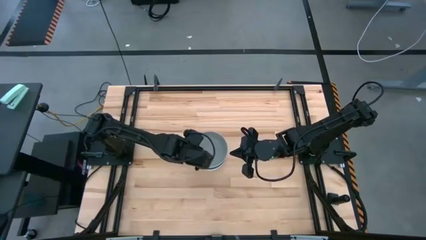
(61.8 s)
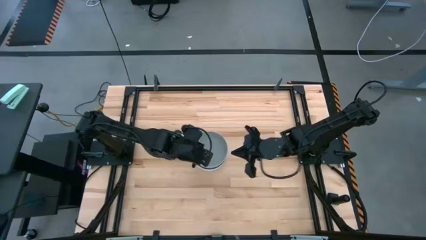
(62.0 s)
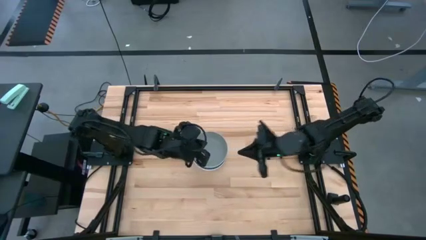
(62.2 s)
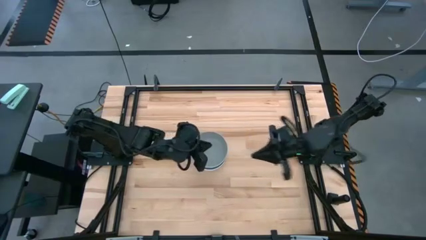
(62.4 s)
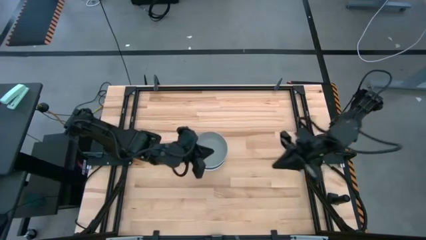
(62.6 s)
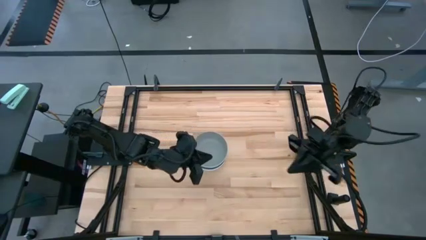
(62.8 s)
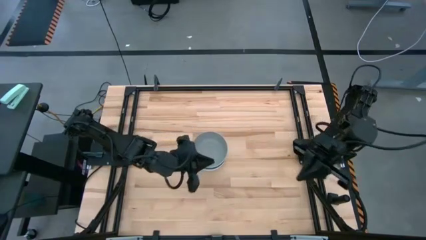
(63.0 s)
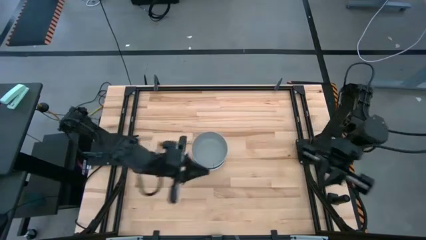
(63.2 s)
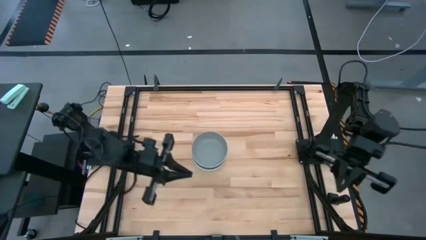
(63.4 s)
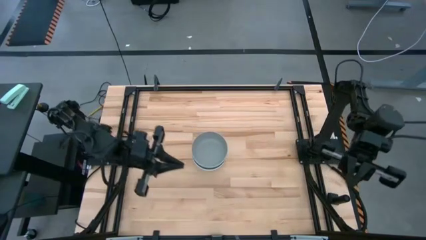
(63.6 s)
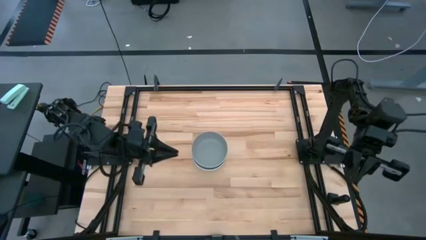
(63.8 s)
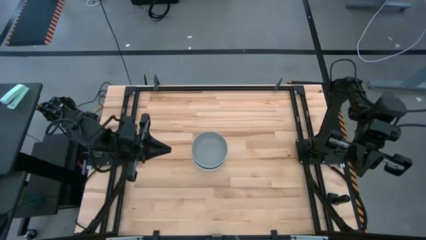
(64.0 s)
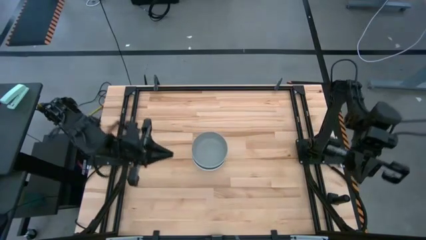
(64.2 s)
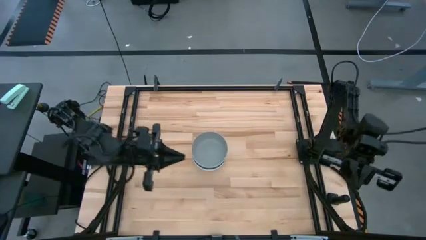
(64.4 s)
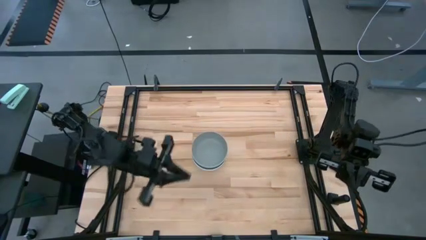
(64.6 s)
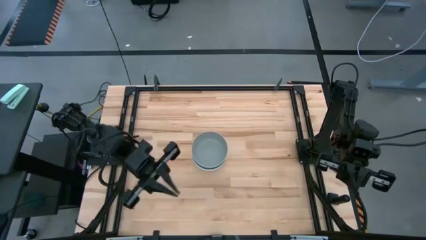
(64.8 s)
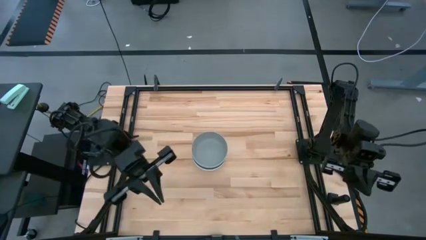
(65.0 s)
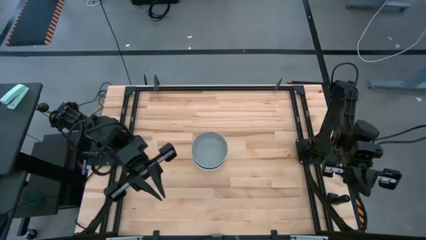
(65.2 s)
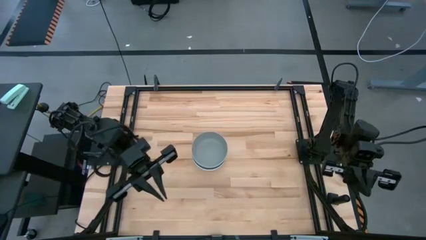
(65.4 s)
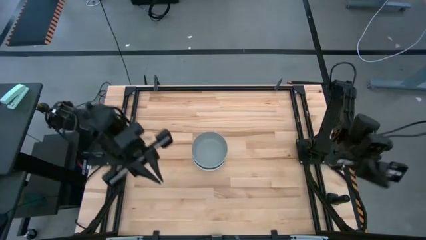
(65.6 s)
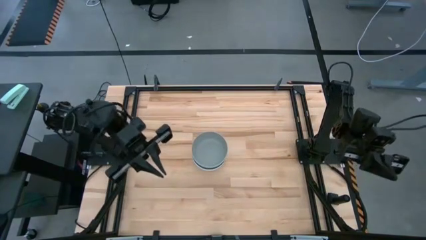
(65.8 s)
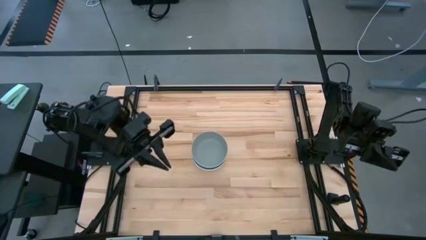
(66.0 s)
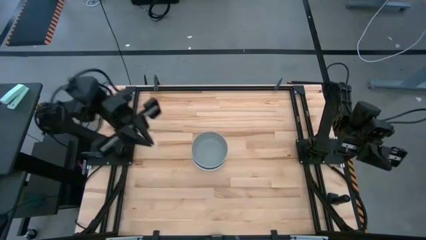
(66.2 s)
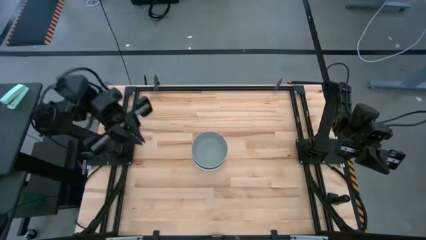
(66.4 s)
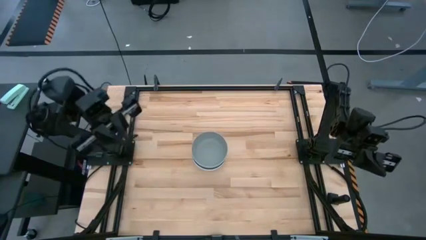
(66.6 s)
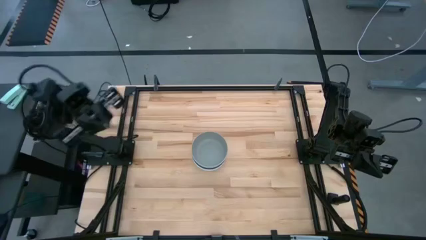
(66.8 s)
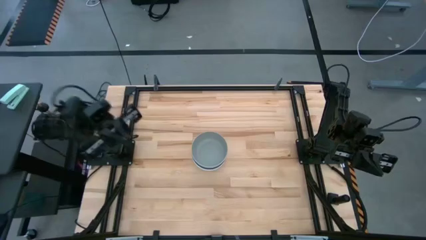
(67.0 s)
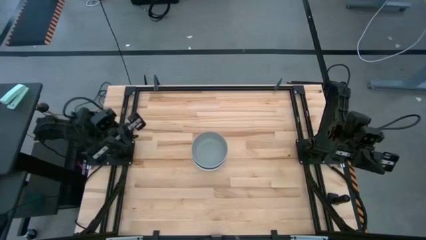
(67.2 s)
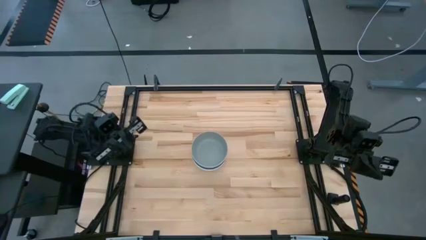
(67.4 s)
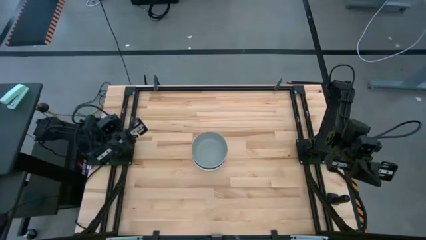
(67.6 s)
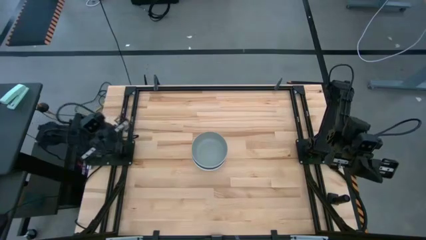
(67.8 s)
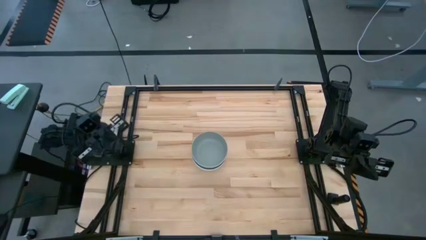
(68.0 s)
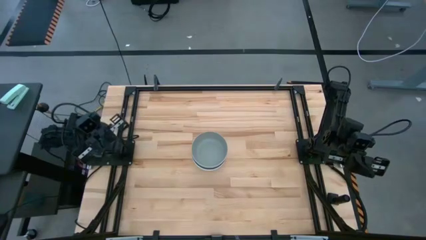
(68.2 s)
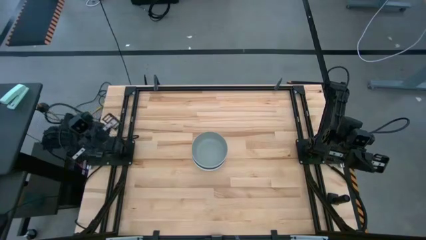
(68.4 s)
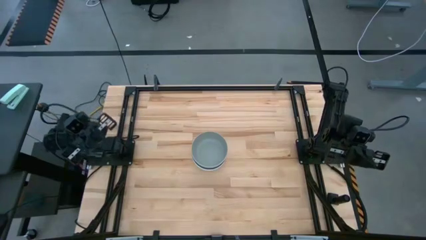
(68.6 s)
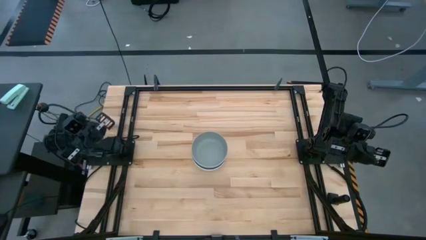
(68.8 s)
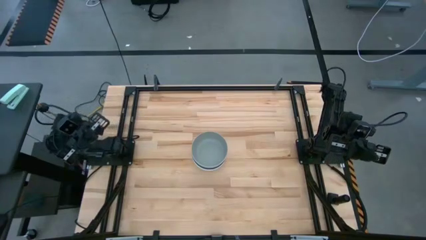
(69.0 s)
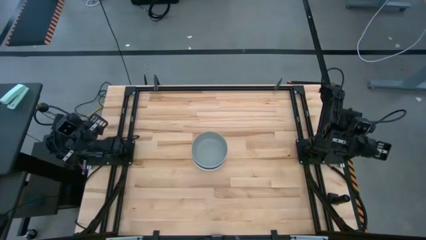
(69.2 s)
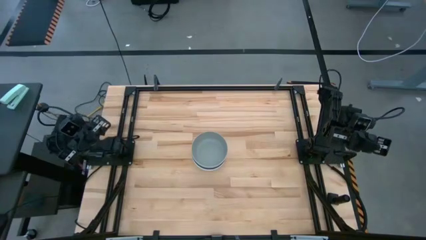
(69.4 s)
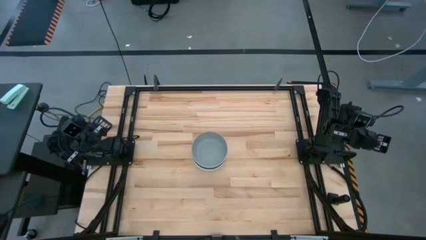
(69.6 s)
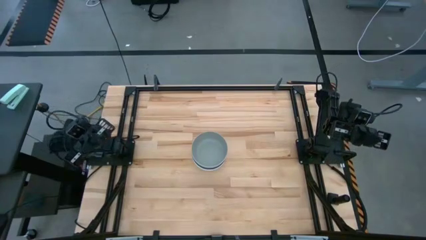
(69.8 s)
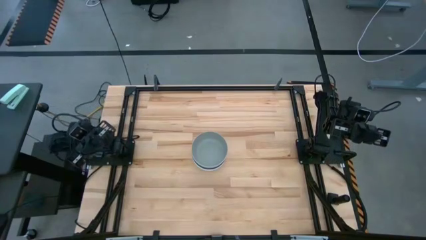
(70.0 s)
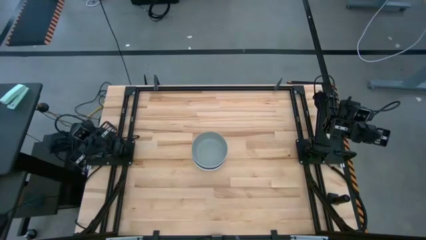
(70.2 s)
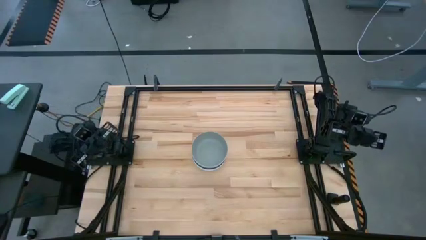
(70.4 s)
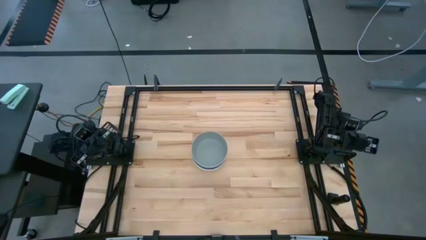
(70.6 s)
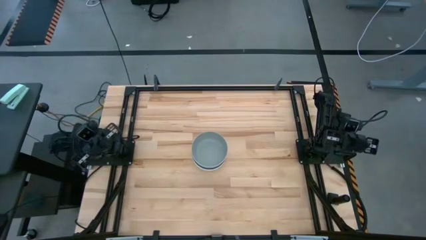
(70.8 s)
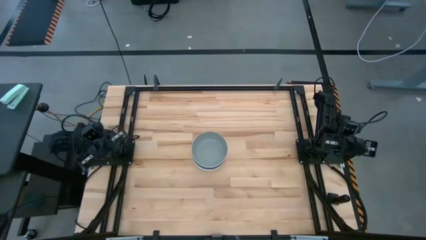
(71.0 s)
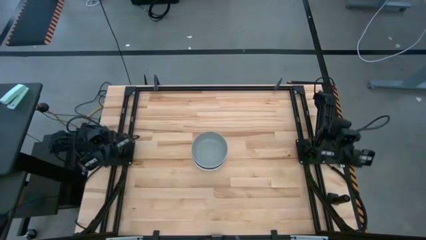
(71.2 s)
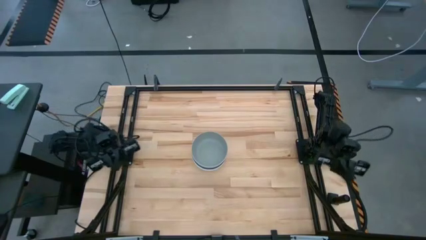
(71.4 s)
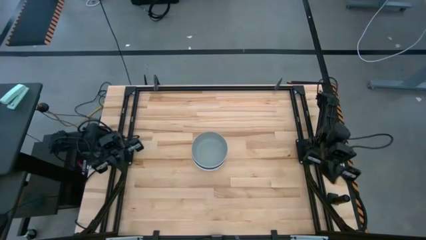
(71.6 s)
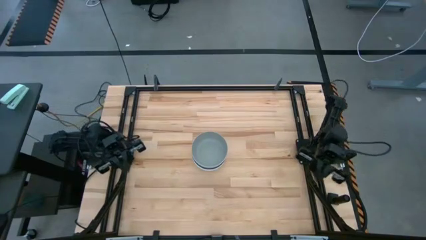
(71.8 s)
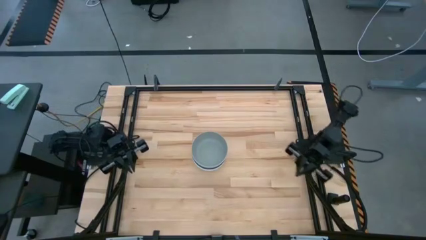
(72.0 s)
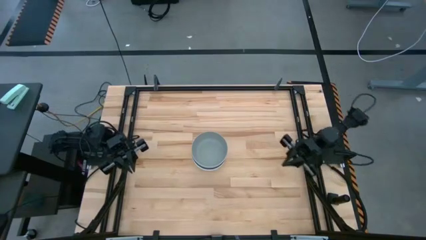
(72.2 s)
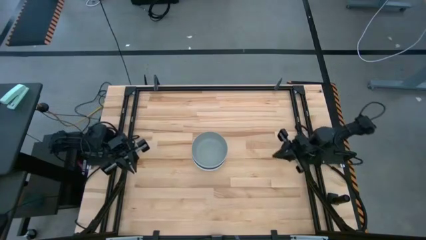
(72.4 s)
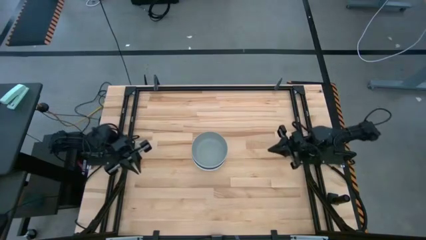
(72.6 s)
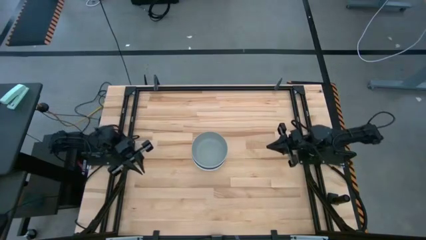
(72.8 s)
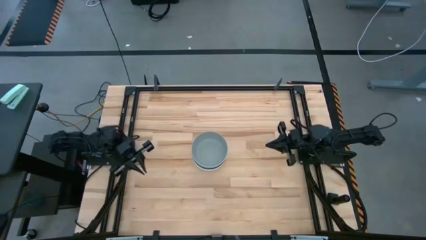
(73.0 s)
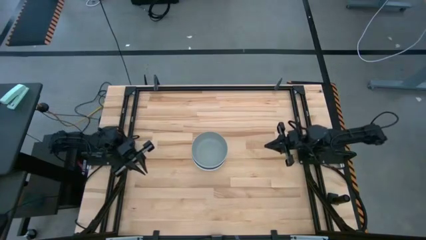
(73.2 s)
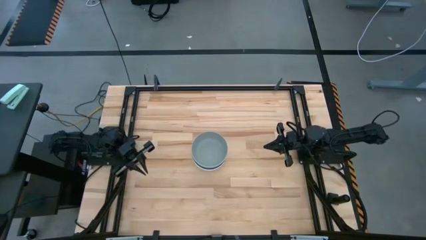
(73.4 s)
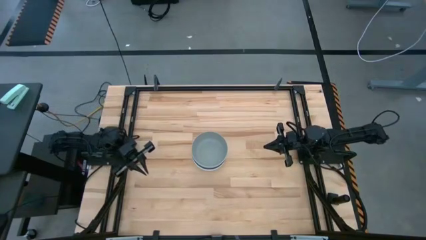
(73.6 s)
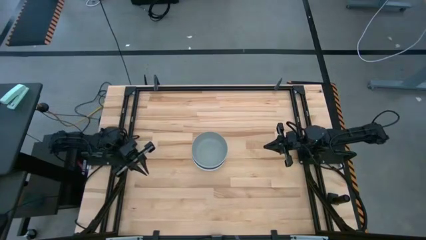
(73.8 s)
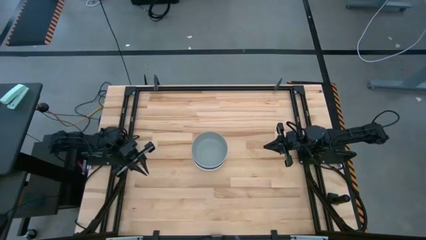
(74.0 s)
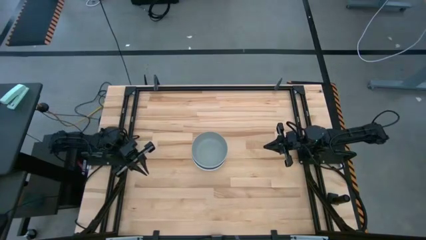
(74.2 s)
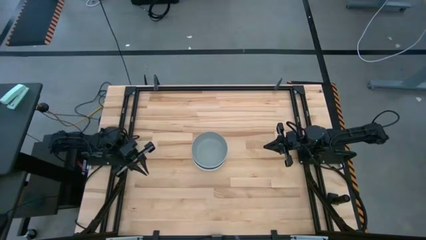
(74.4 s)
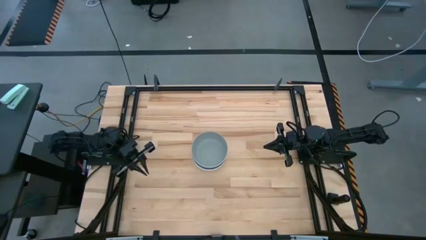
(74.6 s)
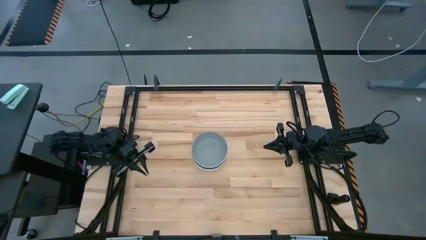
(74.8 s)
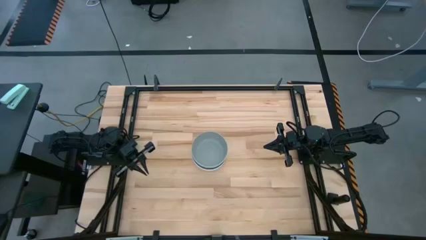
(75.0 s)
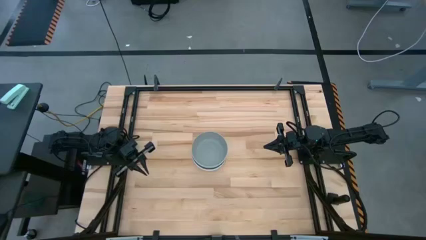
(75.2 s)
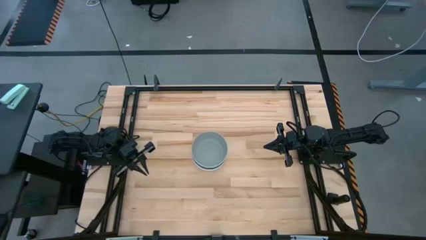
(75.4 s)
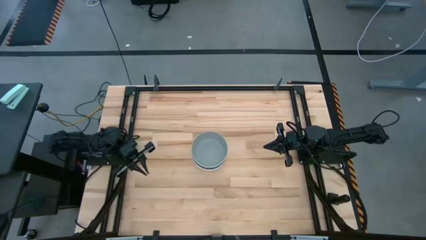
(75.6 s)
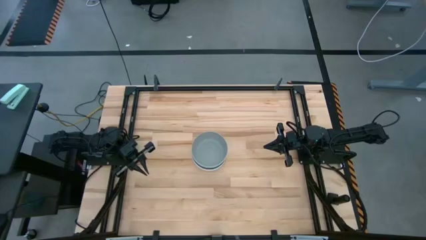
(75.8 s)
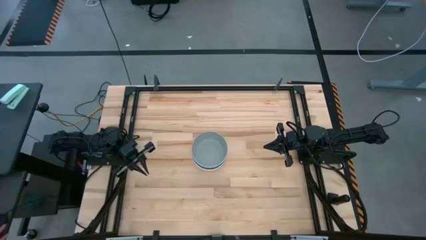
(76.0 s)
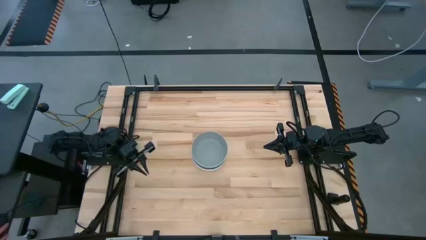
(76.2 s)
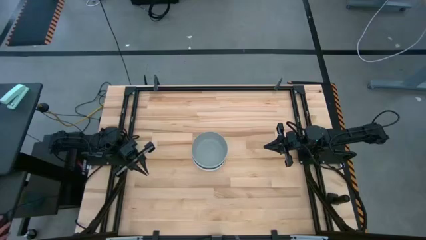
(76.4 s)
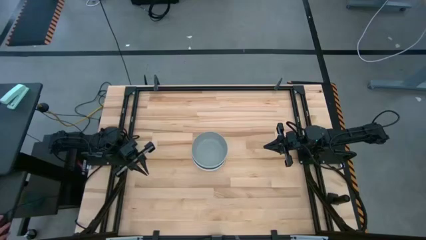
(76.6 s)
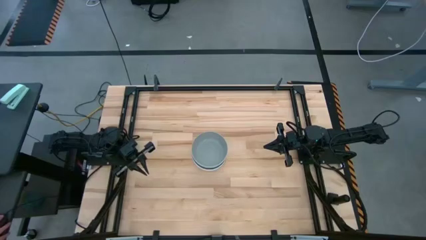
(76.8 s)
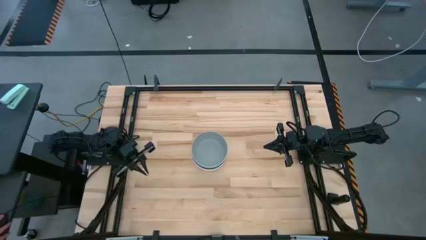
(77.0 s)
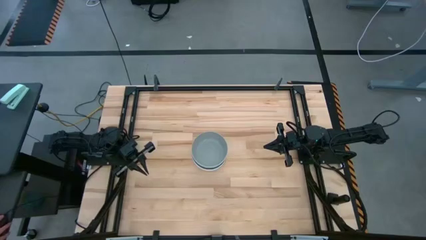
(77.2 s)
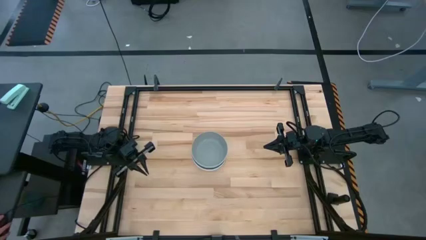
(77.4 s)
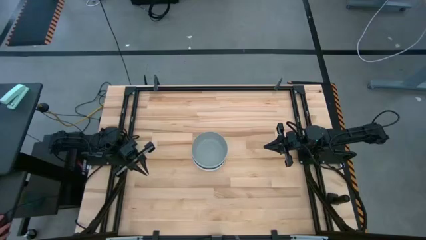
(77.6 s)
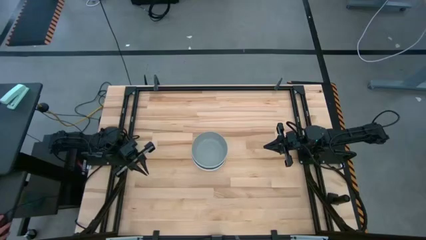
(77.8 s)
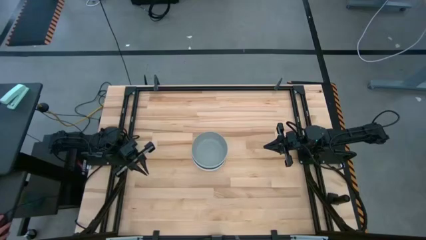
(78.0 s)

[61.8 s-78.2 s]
Task: Nest bowls inside each other
Return to Home Position
